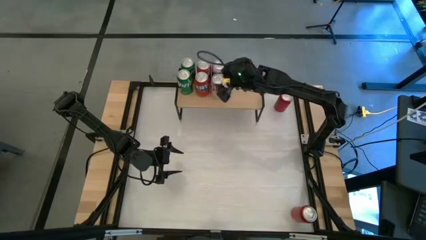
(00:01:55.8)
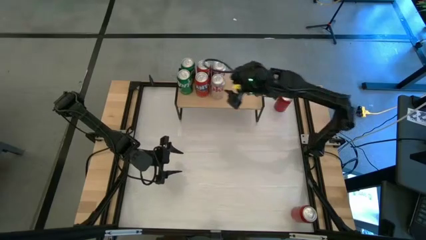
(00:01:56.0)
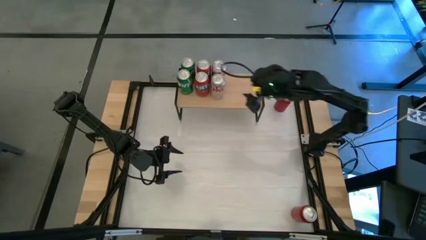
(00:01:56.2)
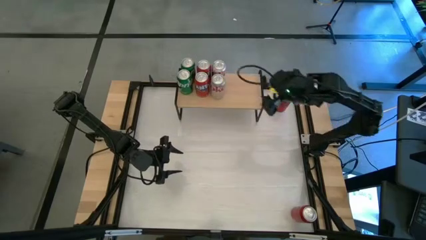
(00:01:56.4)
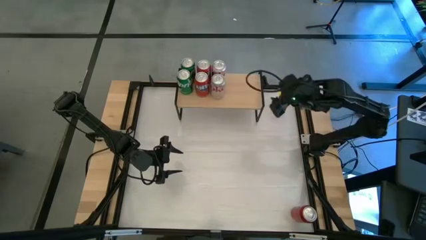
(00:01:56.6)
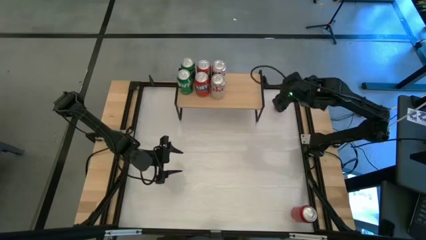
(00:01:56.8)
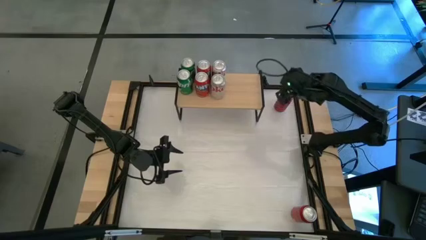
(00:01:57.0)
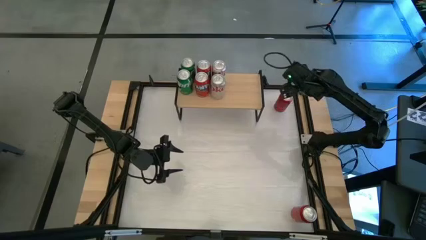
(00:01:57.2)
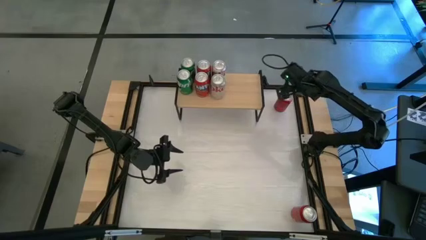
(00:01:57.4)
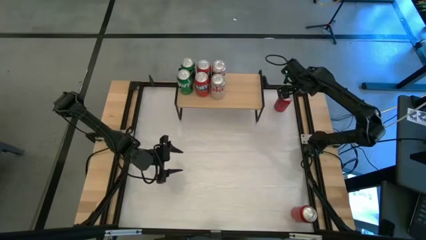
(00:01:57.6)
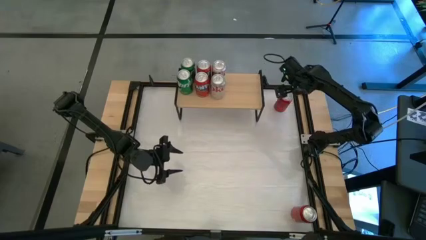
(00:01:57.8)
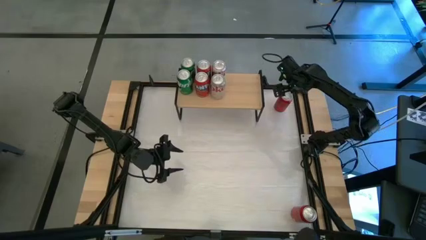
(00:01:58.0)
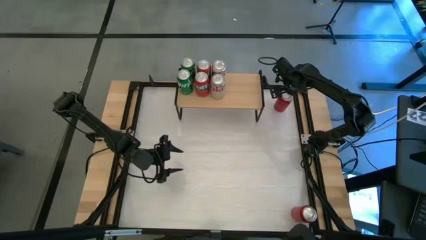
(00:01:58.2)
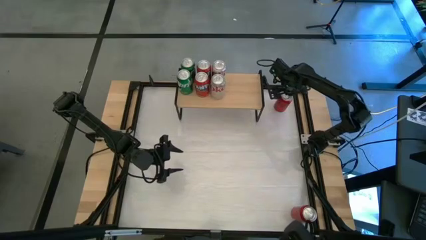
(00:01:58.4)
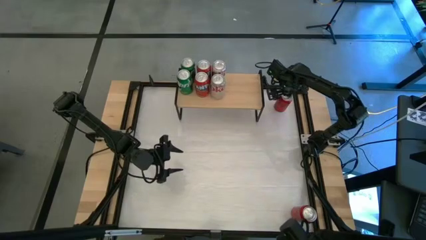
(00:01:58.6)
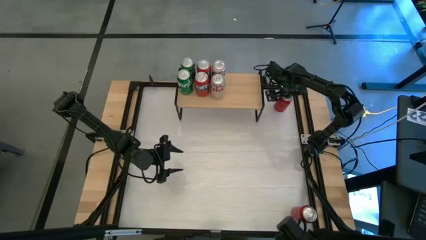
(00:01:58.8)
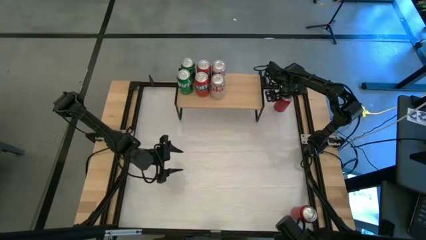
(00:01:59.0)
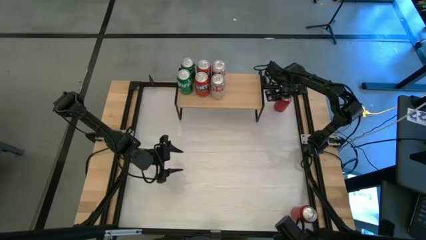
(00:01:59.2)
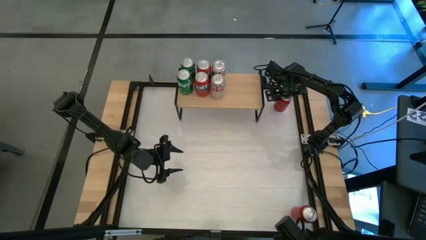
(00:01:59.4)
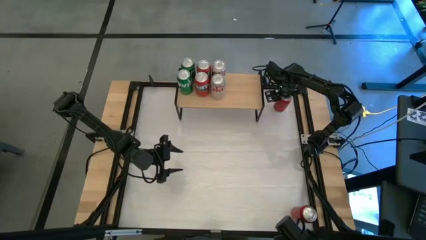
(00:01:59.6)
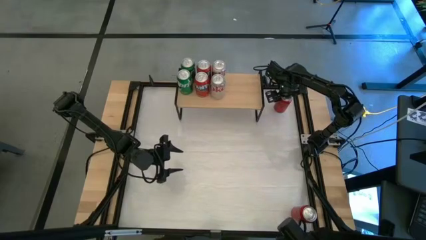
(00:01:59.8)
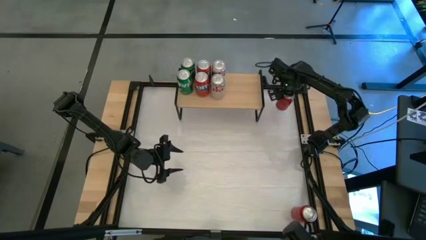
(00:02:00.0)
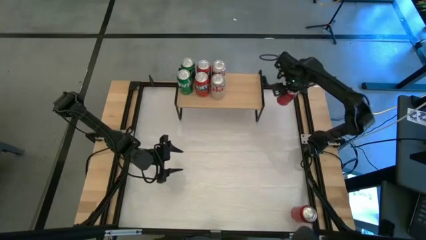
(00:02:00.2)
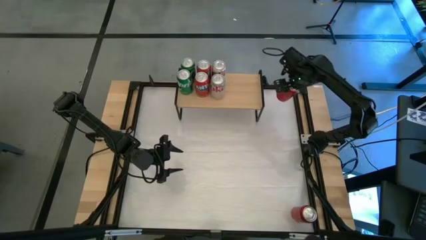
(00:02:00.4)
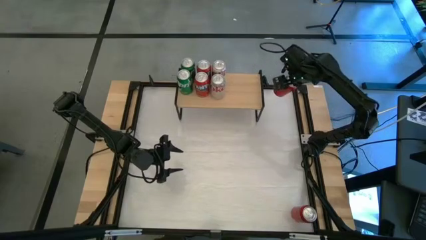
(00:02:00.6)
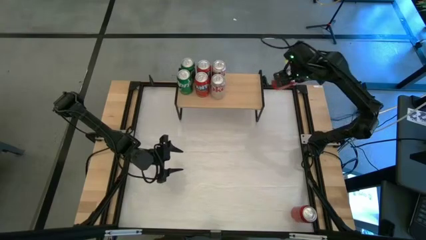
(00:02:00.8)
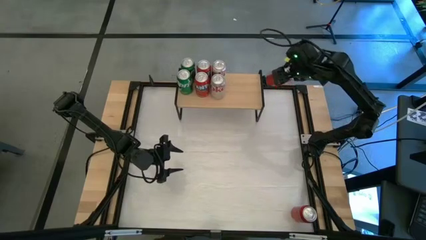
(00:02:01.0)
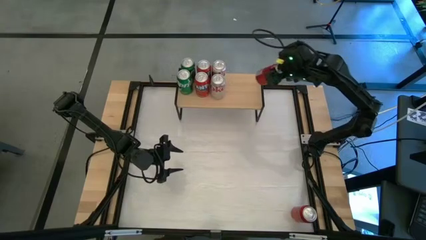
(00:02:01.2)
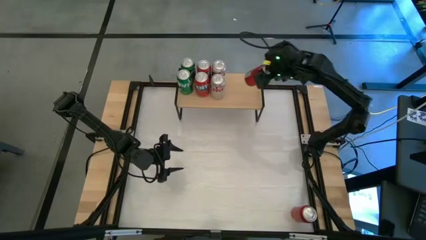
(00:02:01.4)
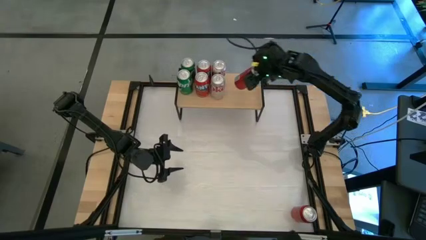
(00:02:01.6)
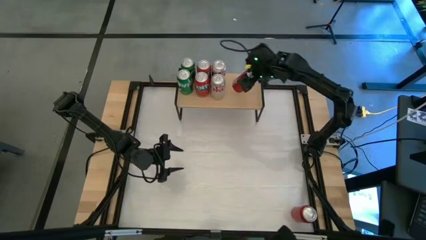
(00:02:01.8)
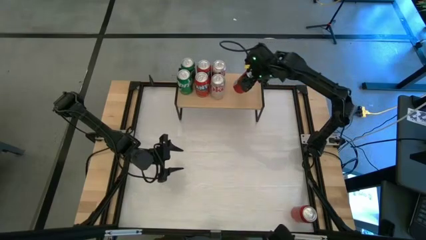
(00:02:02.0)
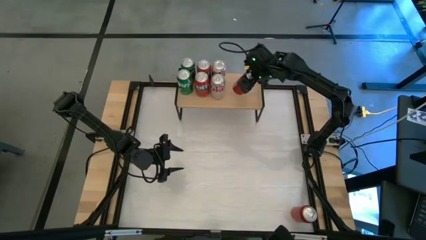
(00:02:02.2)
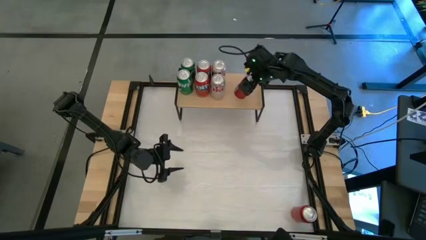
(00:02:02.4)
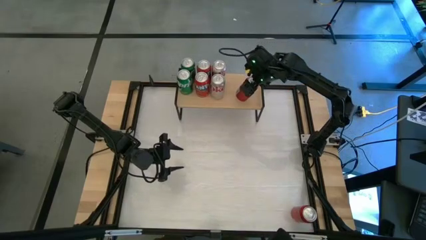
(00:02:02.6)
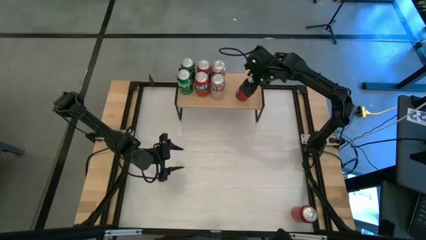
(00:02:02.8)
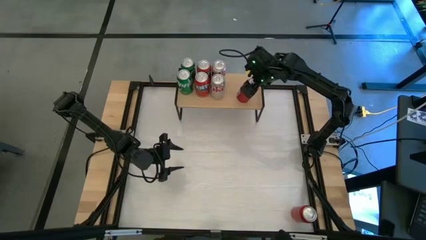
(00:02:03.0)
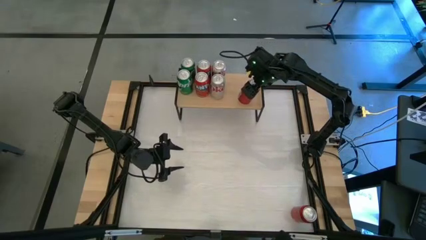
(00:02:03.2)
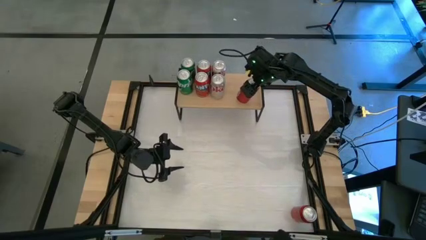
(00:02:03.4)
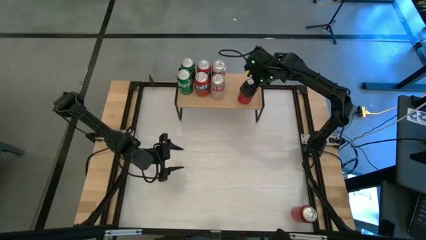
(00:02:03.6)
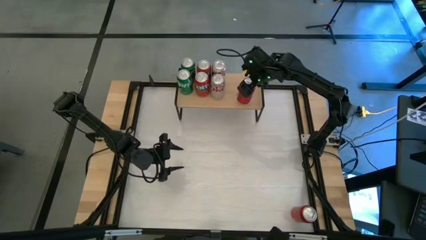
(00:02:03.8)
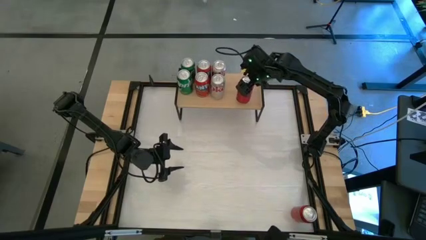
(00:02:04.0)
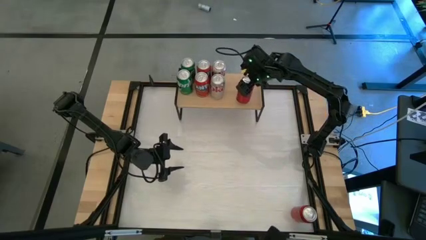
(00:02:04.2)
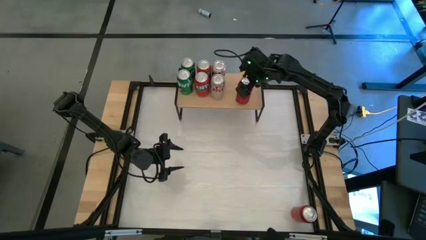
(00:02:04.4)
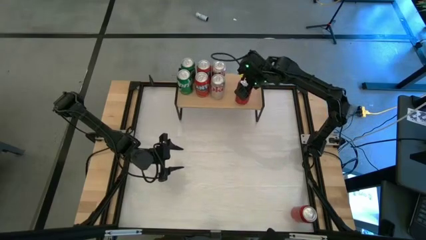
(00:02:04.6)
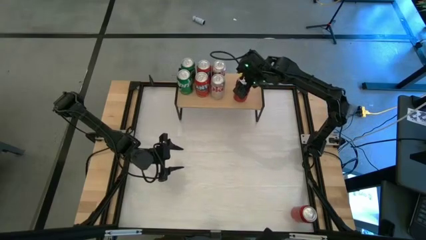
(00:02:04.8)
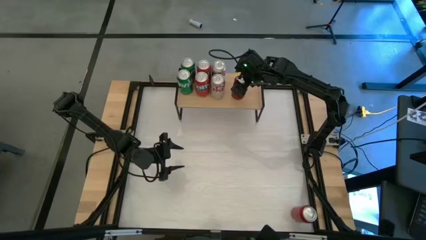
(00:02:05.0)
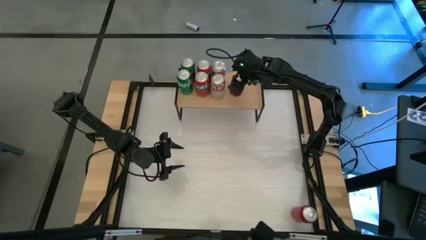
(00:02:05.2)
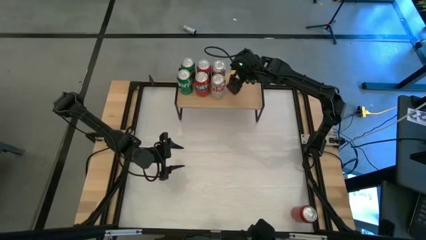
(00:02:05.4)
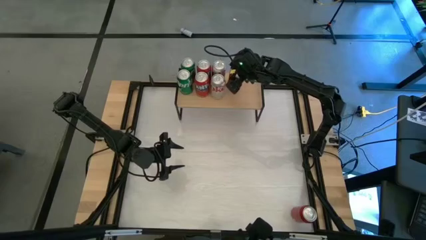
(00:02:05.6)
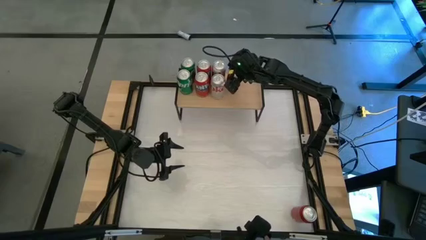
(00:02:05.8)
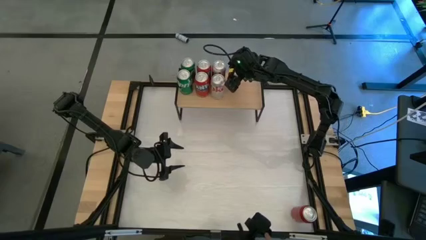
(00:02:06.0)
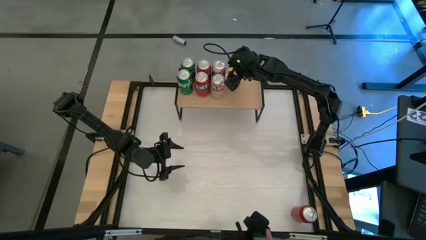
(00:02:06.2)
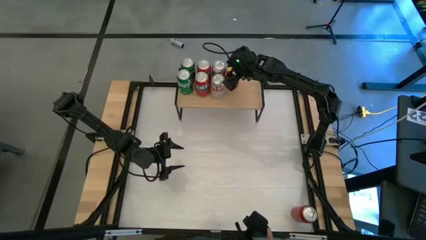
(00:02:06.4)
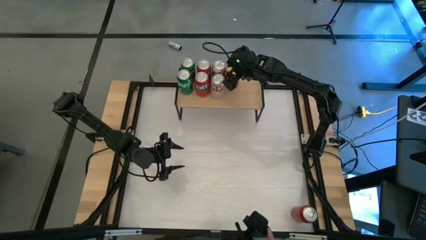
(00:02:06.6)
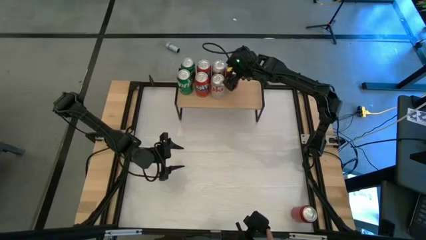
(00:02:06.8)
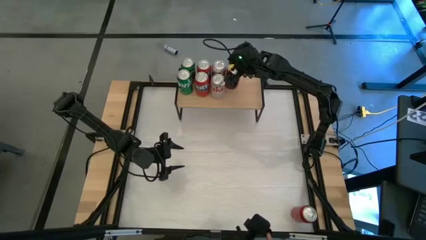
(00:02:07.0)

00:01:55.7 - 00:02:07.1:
Task: Place canned beverage on shelf
Put the top red soda can on the shelf

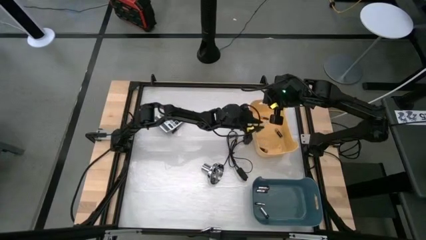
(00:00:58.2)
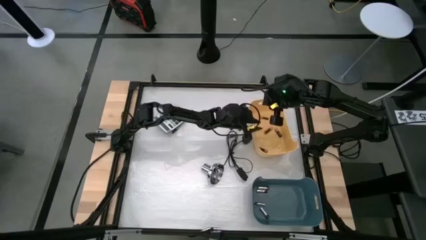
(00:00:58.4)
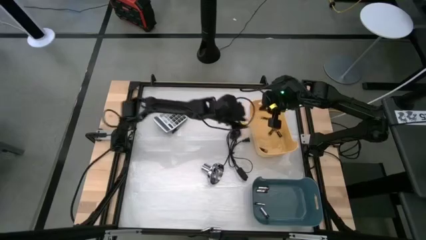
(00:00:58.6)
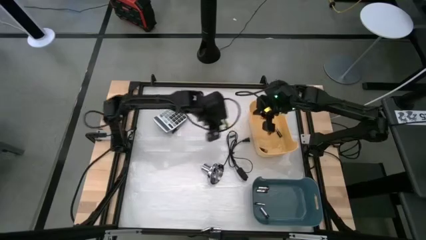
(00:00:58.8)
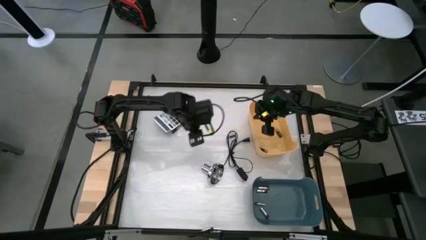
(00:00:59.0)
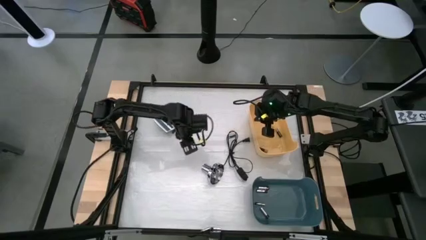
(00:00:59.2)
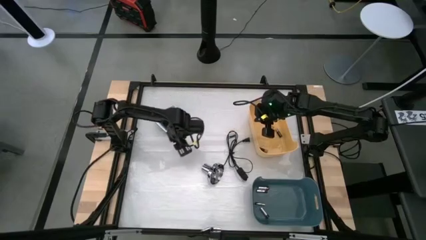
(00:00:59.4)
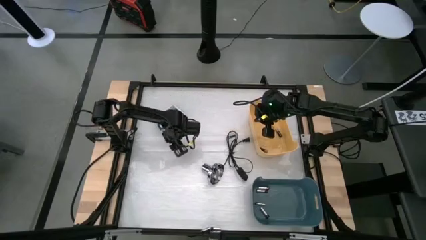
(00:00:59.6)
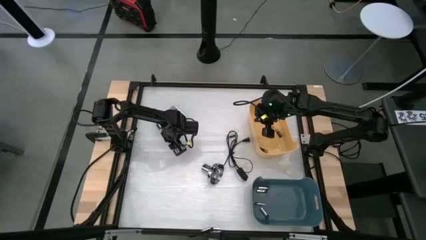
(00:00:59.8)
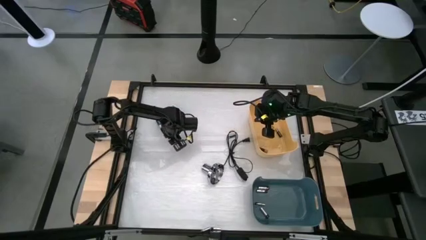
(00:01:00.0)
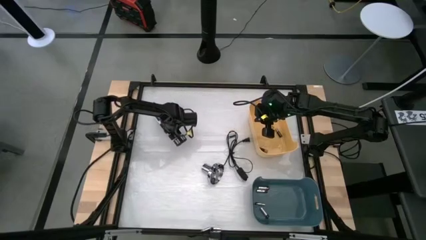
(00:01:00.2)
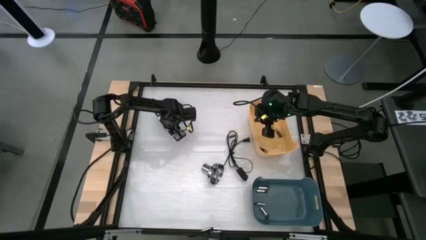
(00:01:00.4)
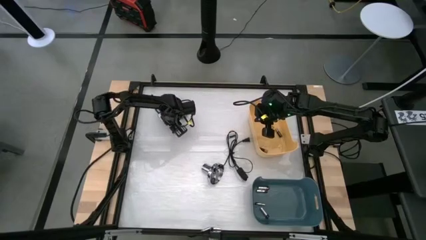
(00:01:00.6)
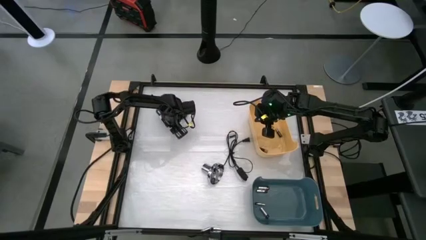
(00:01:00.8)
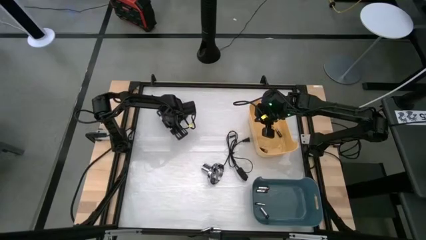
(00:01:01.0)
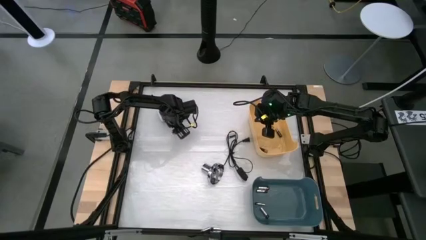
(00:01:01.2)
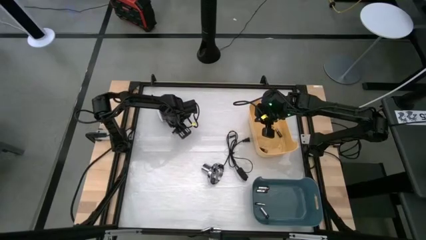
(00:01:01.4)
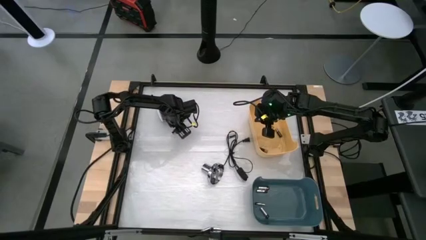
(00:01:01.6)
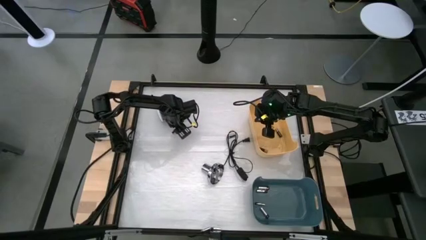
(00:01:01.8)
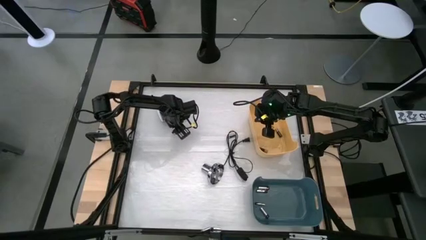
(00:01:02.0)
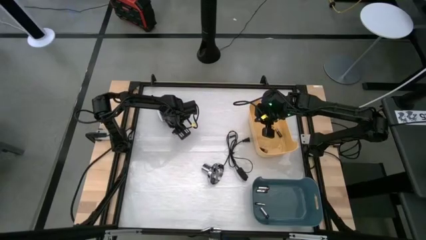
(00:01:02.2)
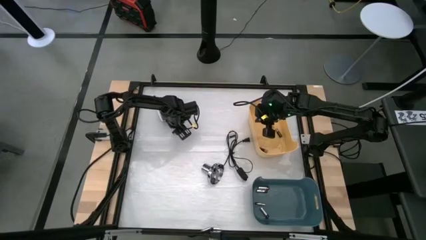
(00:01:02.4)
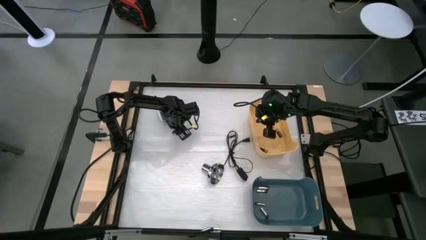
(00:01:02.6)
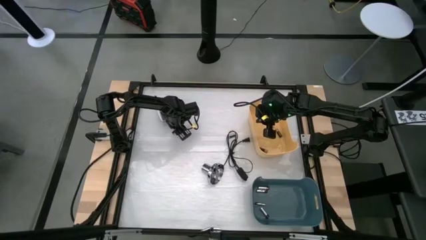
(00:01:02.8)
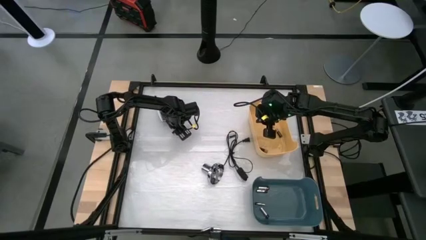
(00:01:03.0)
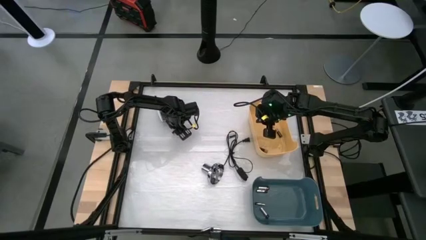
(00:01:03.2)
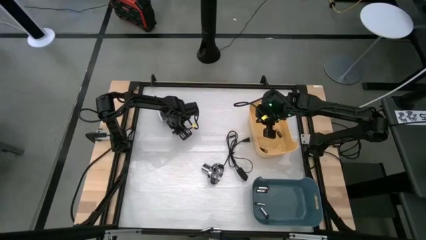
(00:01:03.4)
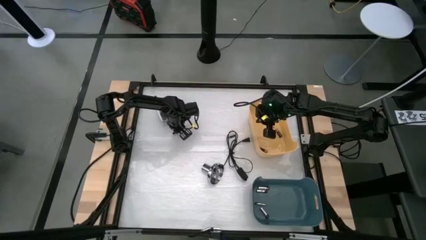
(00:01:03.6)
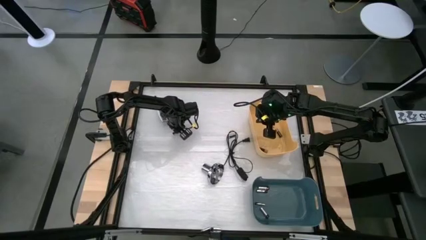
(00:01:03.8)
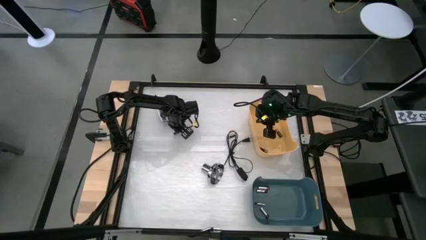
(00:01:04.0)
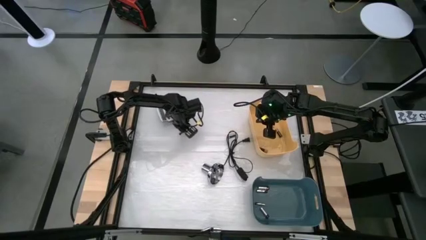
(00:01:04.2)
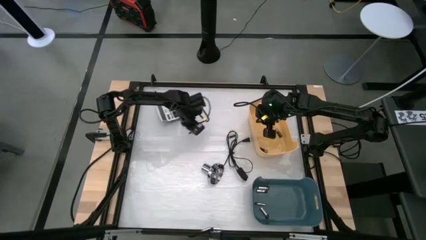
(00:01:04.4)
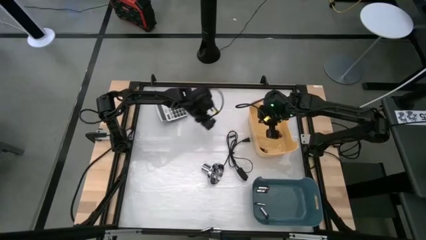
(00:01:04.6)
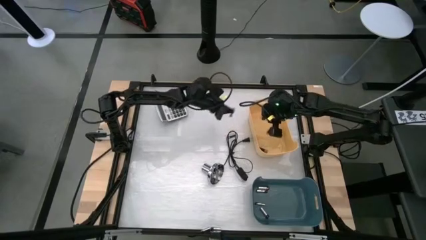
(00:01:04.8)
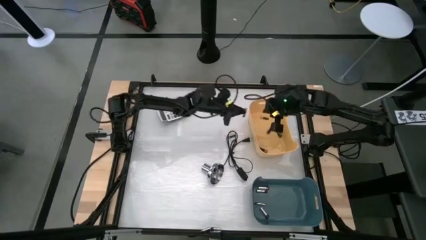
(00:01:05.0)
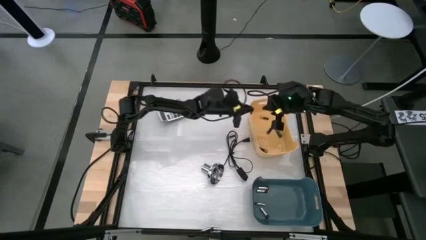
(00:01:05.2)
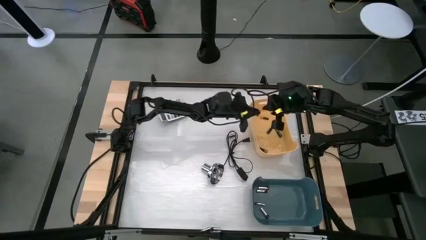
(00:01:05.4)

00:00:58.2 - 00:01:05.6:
Task: Sort batteries
Put the black battery into the yellow bin
